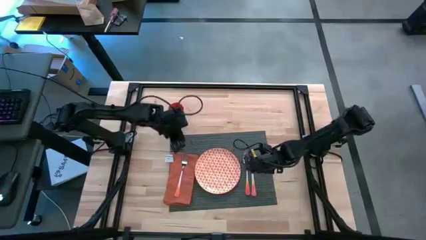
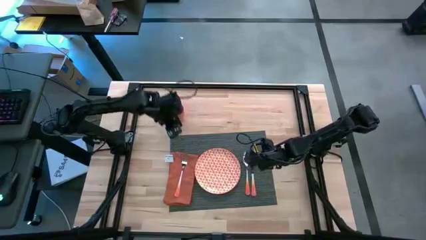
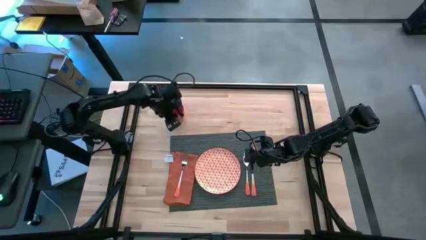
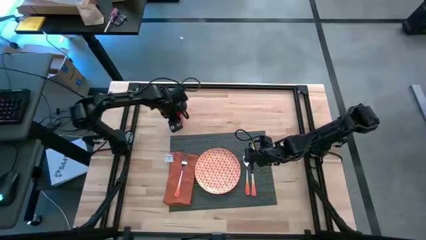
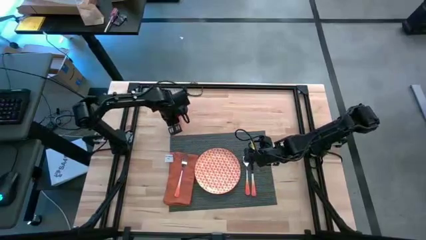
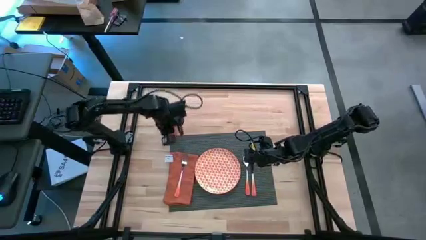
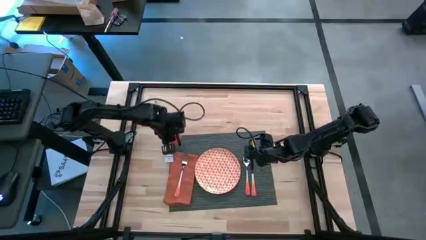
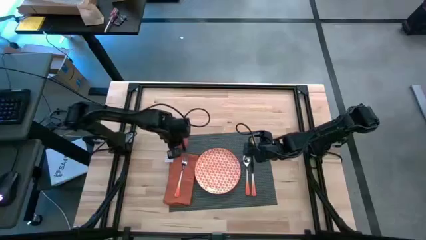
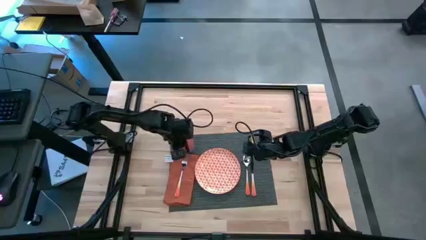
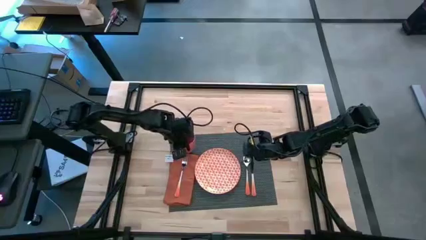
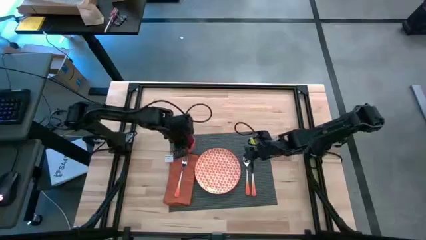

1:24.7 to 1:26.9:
Task: Set table place
Put the orange cup on the gray placemat to the top of the orange table napkin

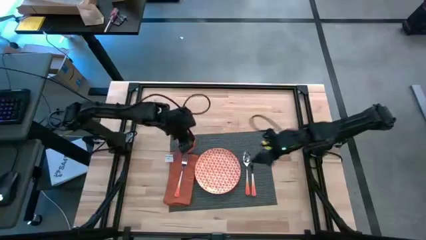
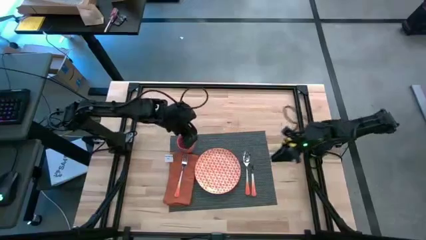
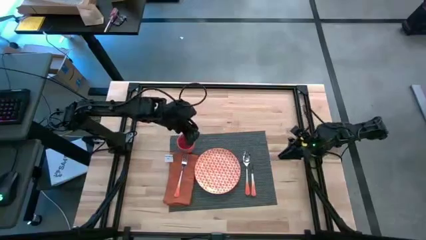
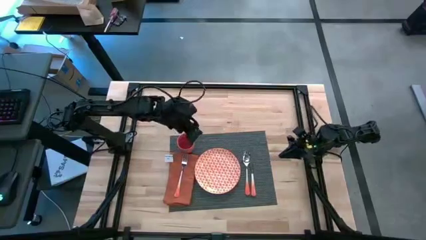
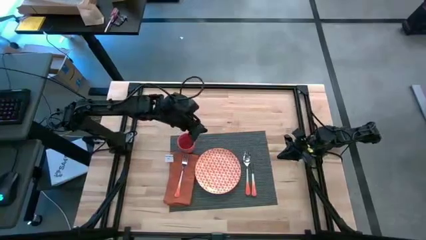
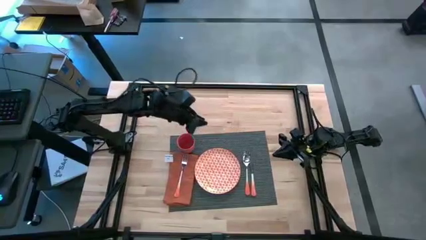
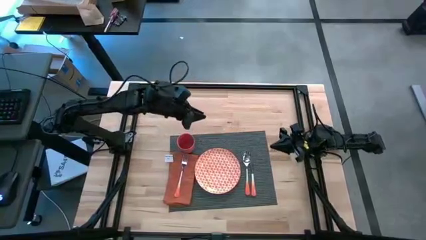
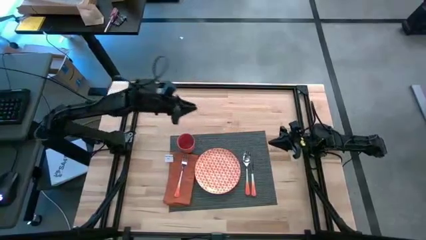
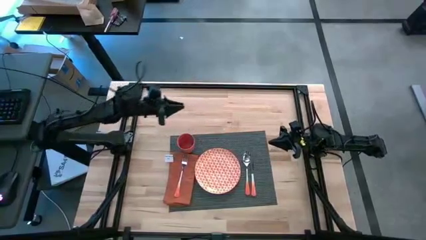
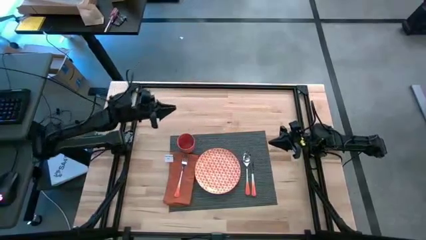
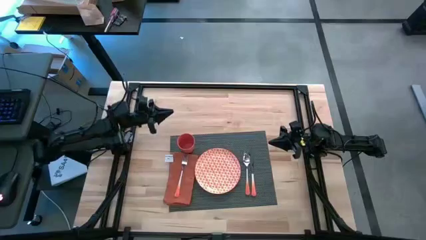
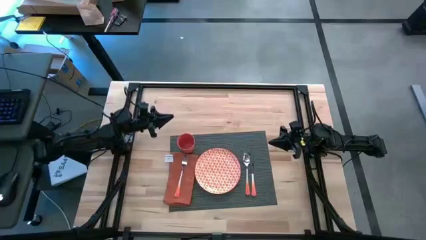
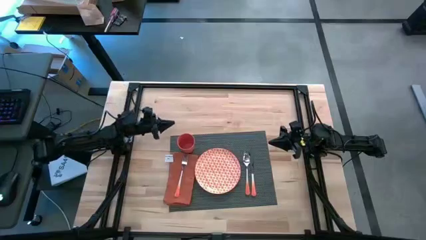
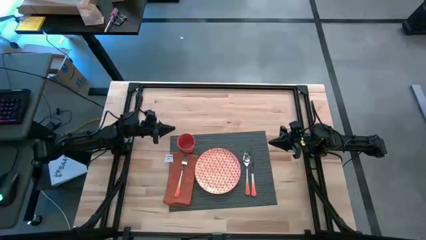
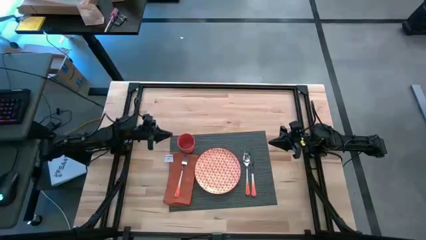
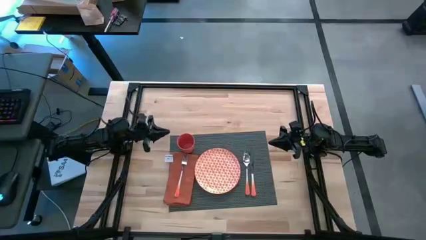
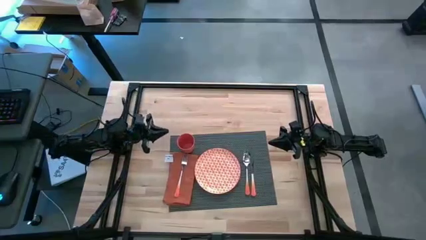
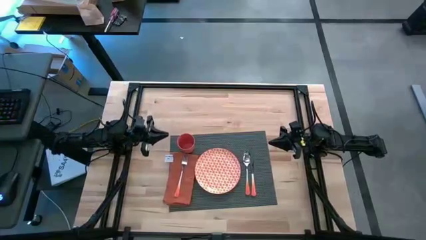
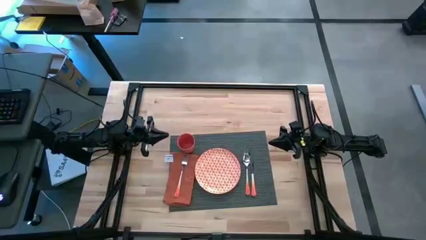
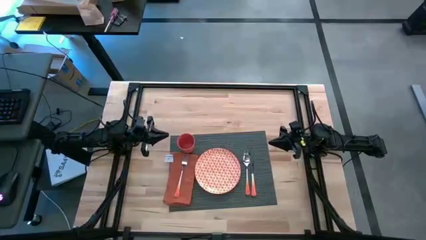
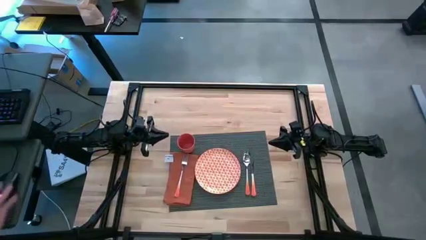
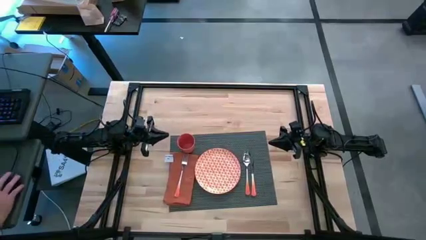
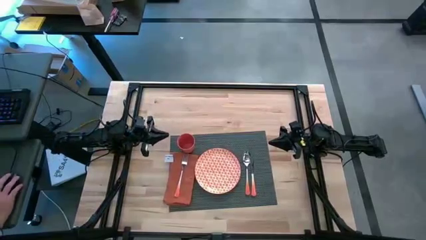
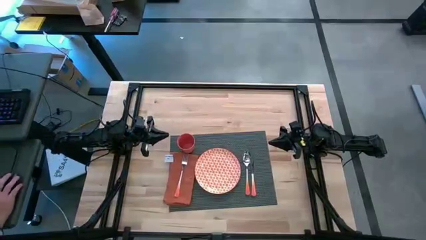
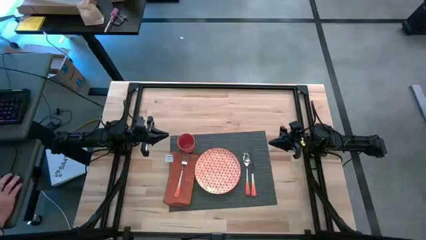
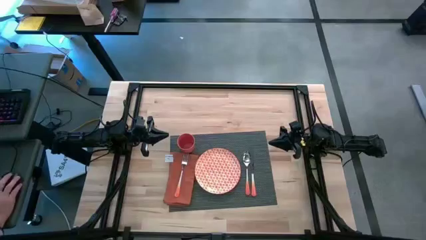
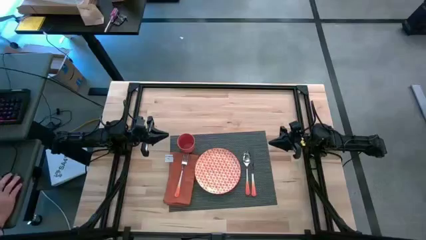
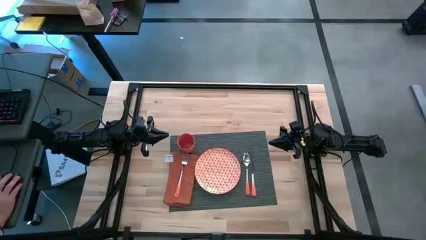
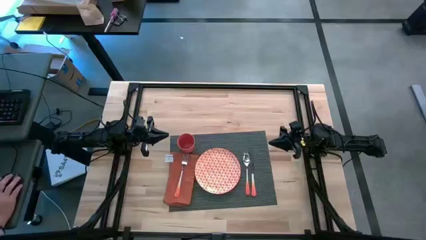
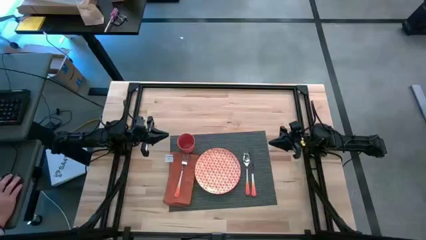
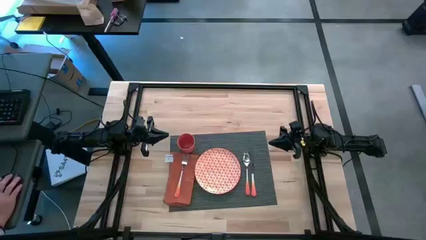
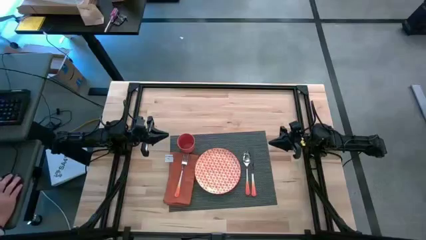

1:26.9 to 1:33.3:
Return to Home Position

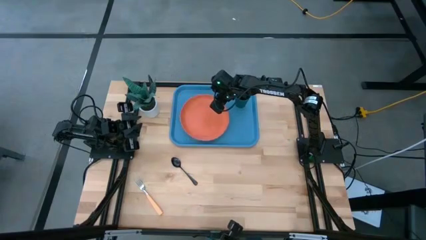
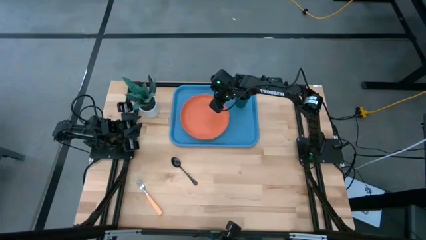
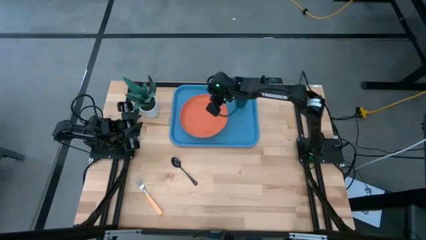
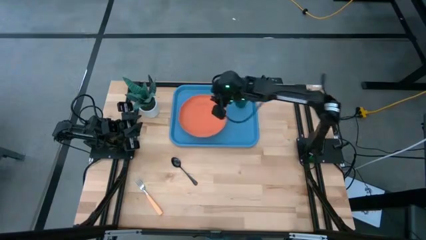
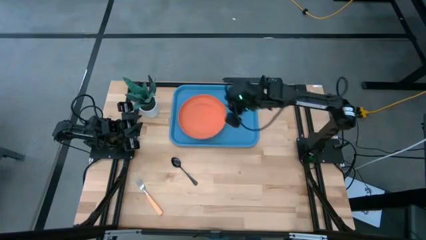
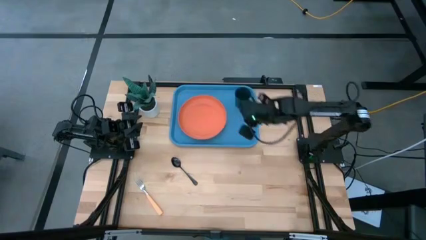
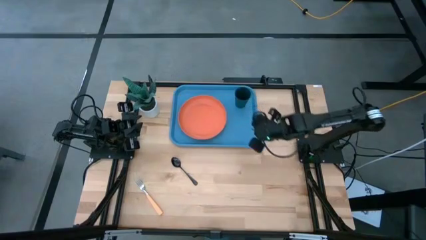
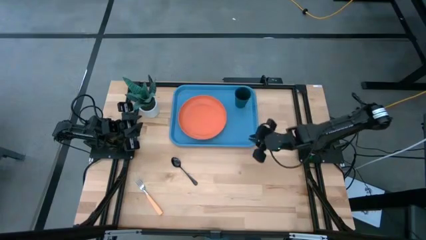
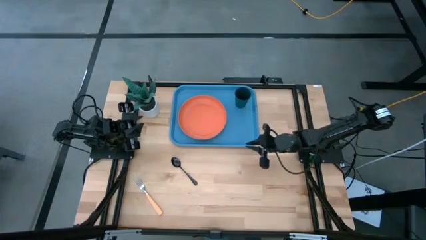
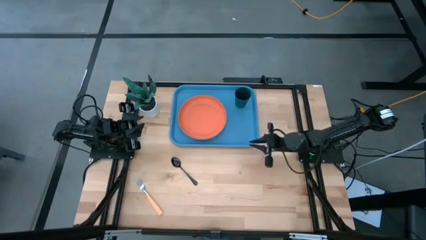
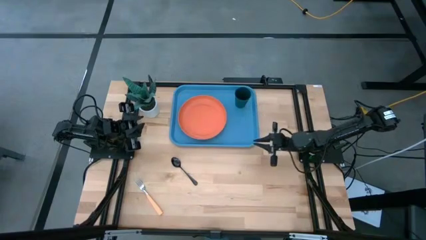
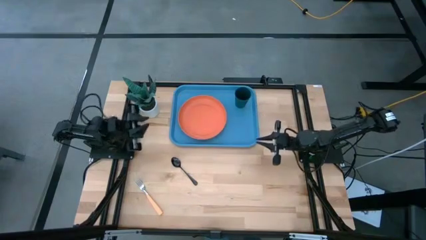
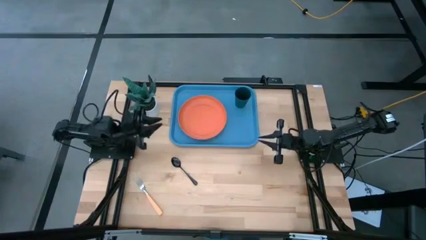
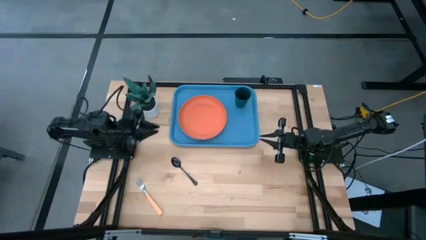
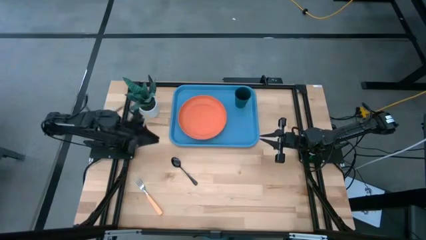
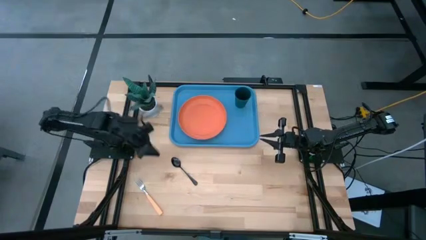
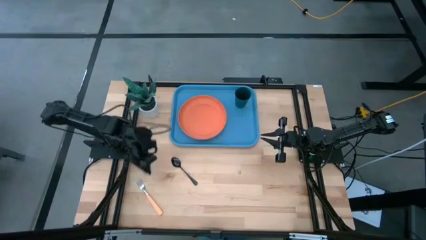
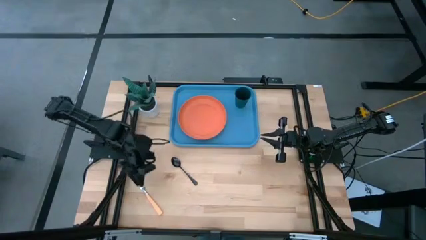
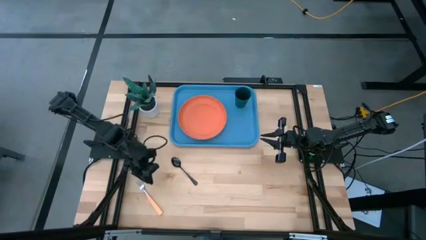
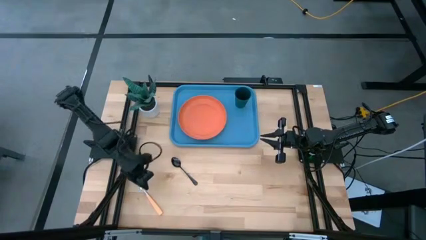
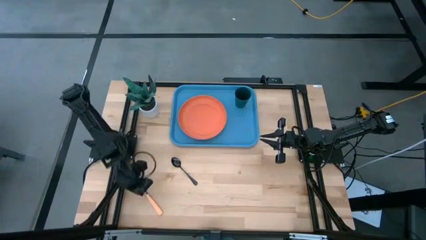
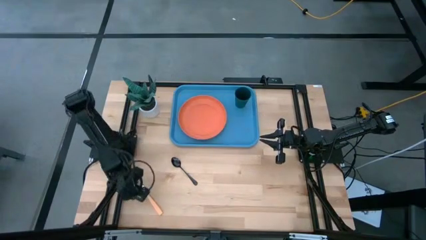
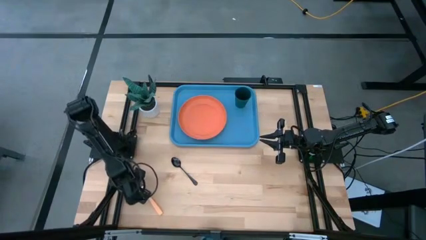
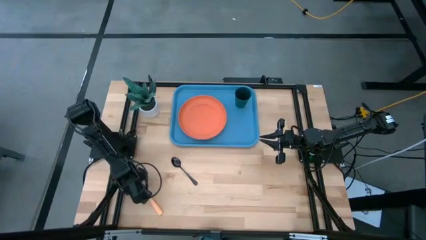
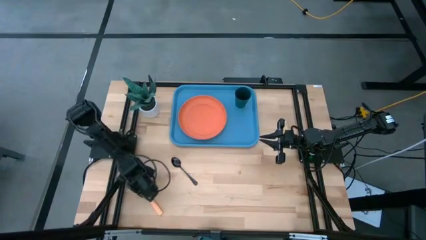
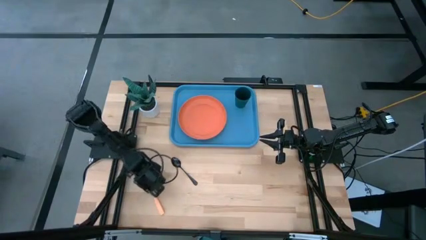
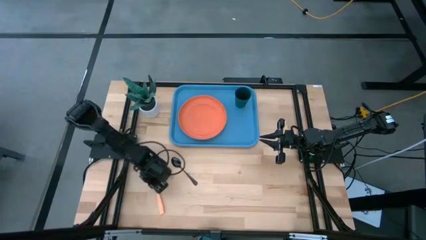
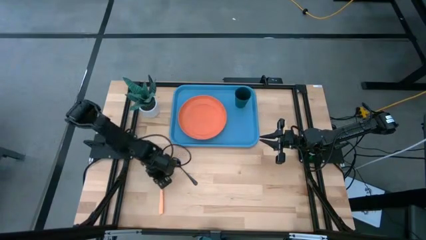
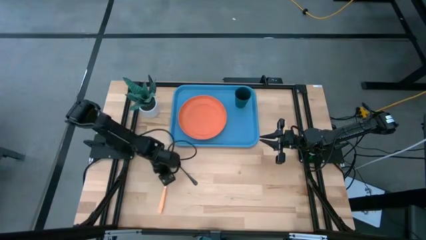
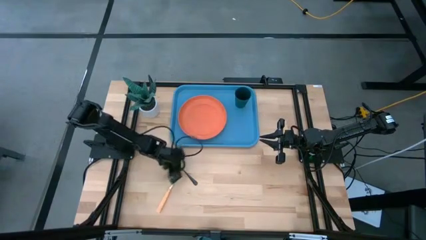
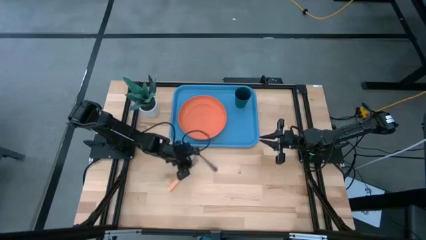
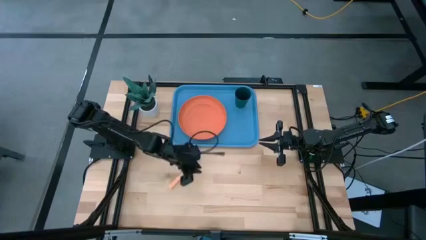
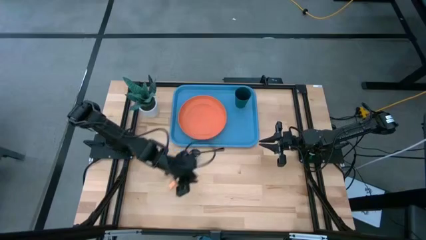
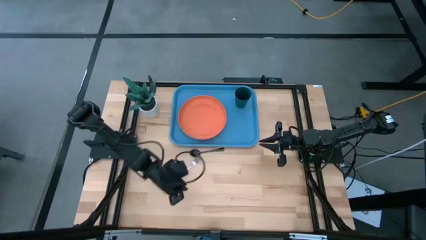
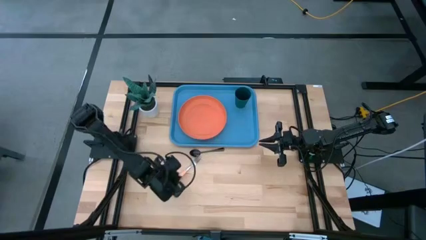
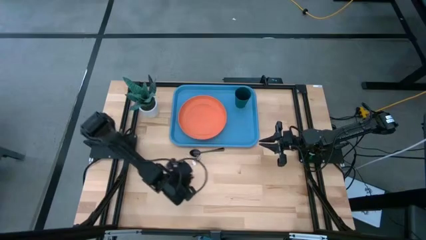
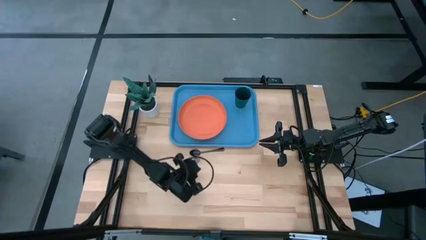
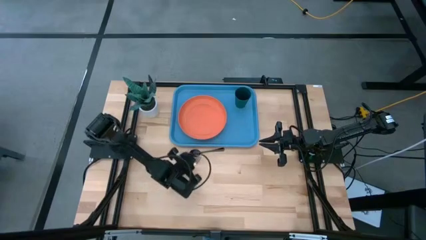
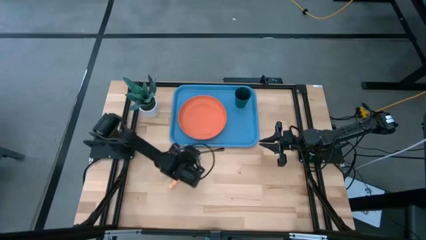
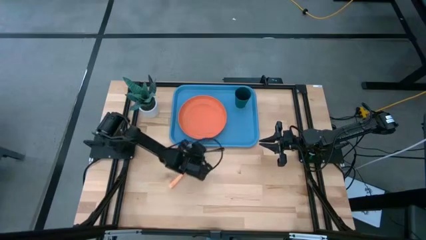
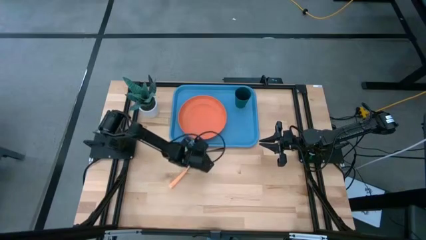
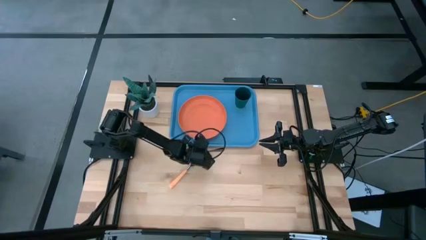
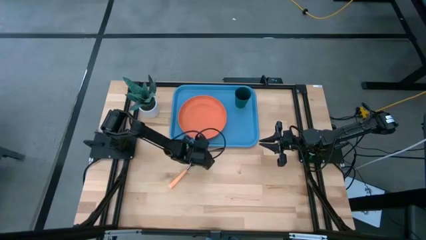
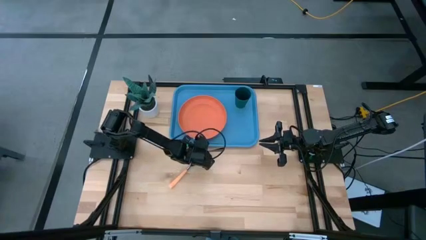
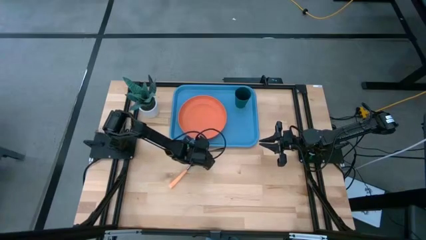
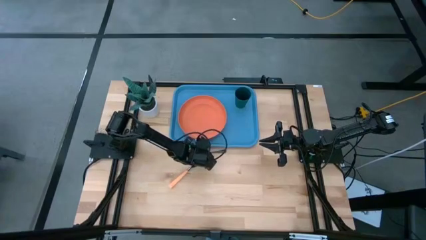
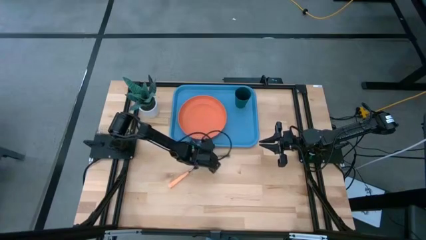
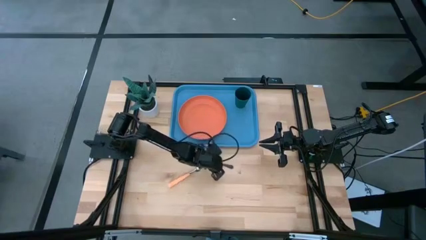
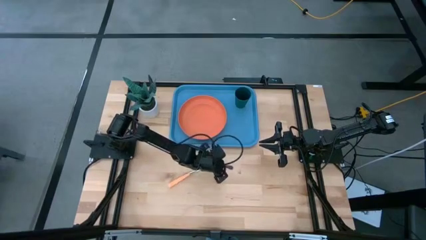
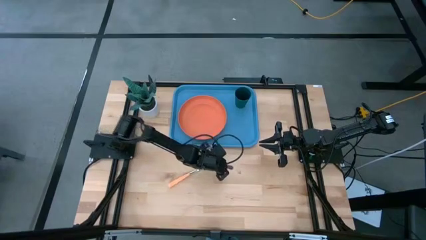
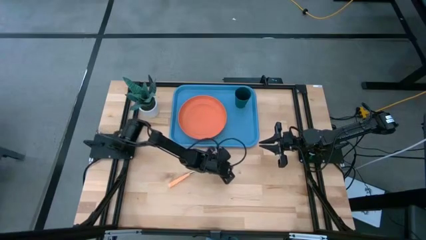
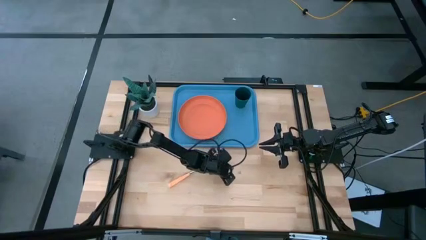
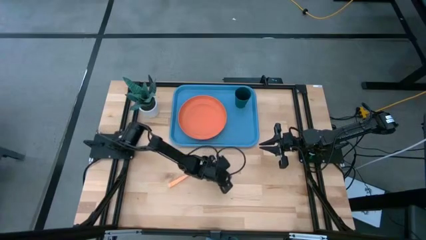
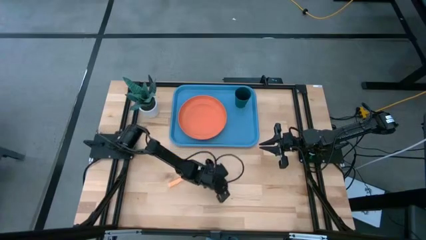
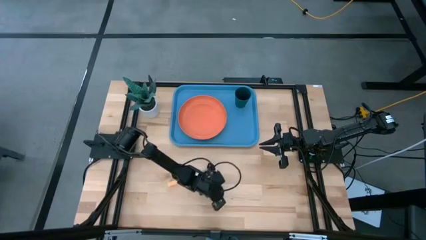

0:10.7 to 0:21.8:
Task: Pick and place plate/cup/fork/spoon on tray
Adjust the utensils on the table
